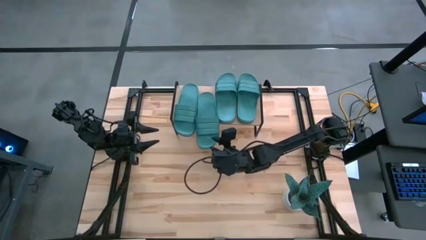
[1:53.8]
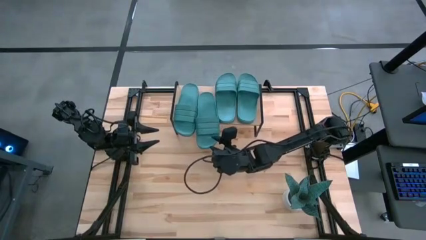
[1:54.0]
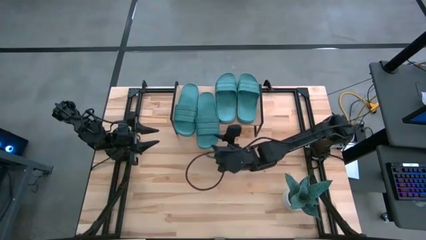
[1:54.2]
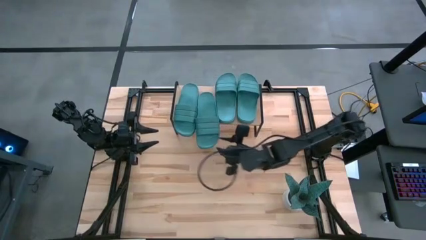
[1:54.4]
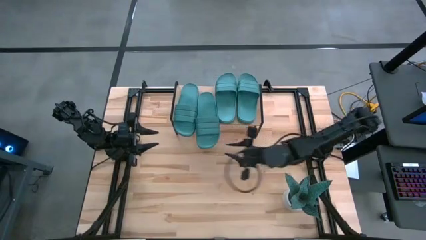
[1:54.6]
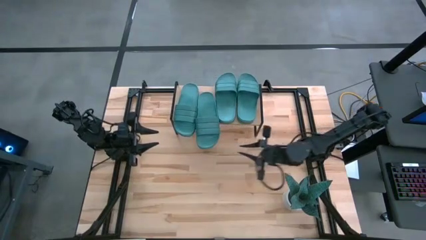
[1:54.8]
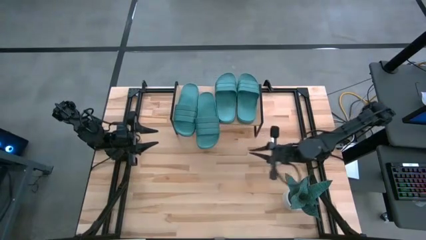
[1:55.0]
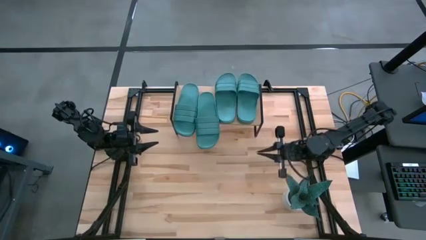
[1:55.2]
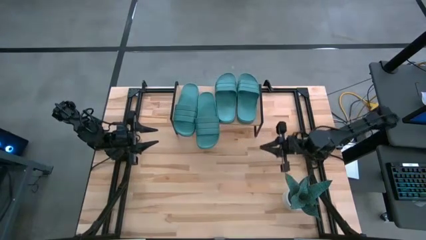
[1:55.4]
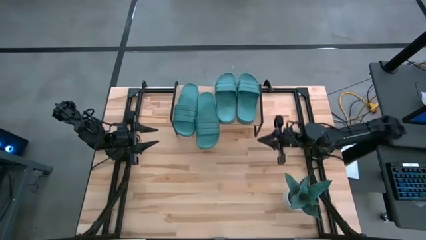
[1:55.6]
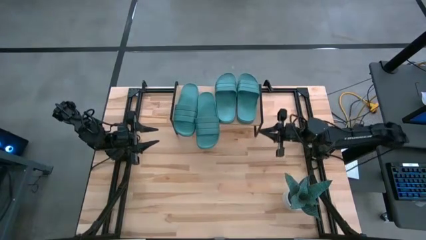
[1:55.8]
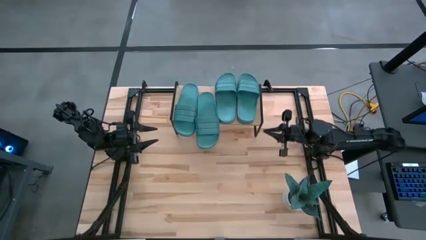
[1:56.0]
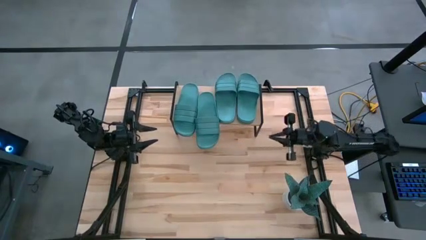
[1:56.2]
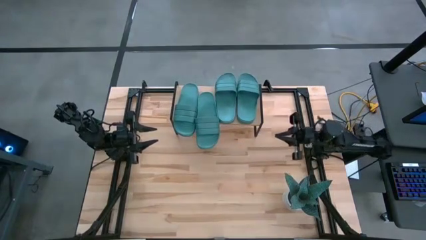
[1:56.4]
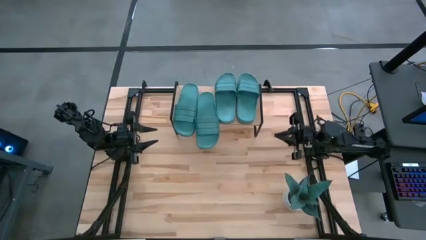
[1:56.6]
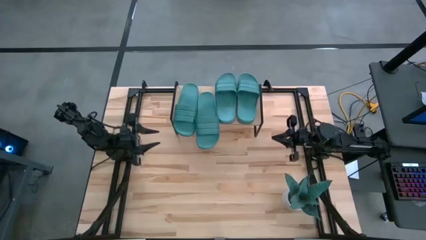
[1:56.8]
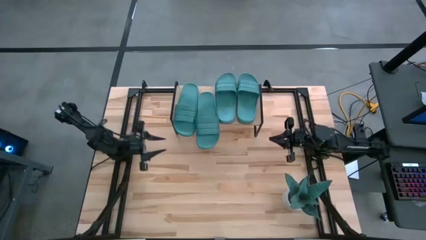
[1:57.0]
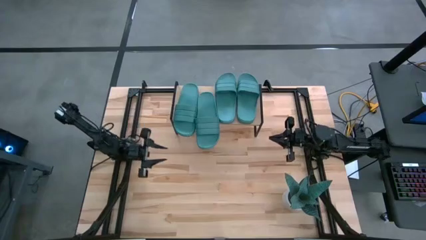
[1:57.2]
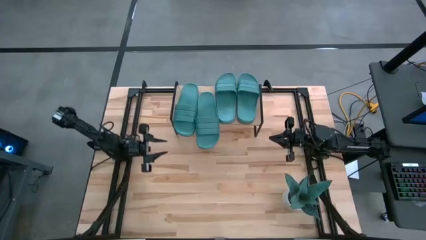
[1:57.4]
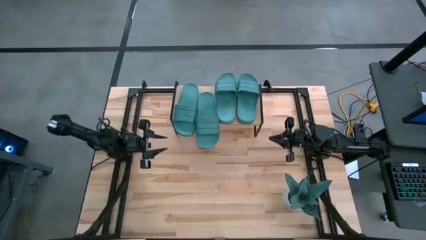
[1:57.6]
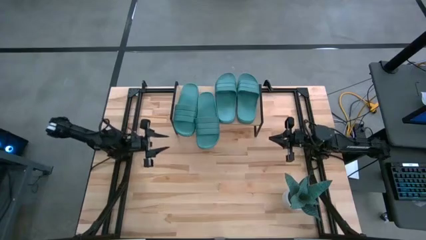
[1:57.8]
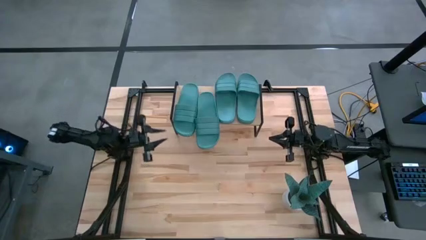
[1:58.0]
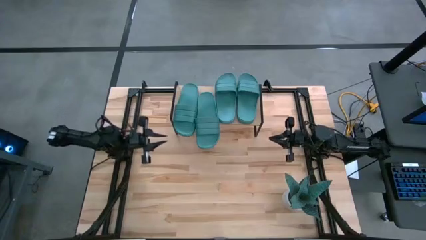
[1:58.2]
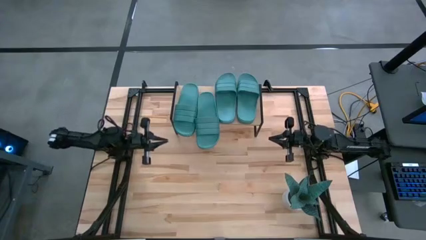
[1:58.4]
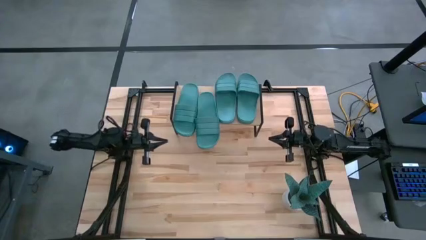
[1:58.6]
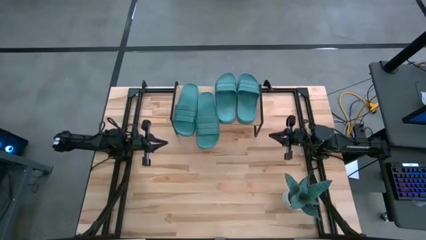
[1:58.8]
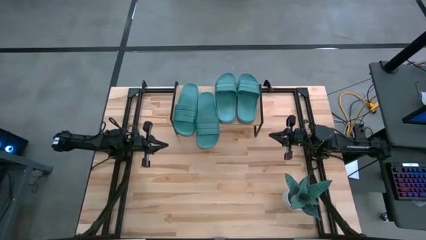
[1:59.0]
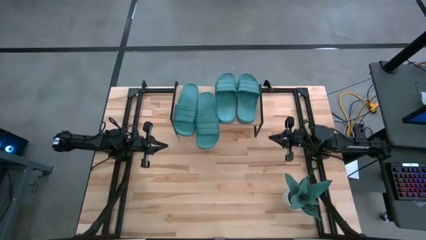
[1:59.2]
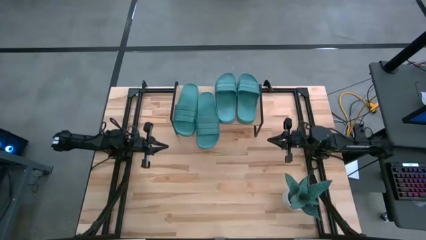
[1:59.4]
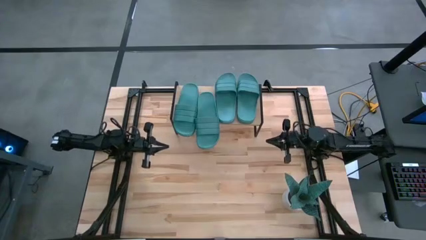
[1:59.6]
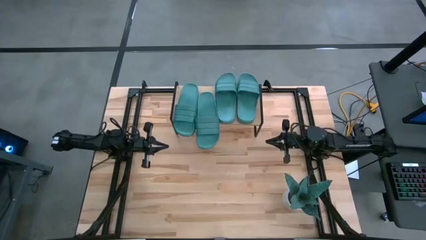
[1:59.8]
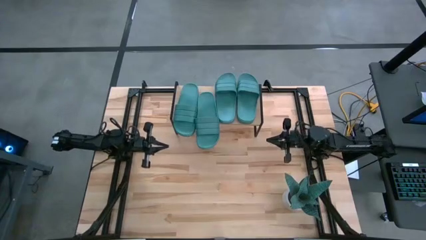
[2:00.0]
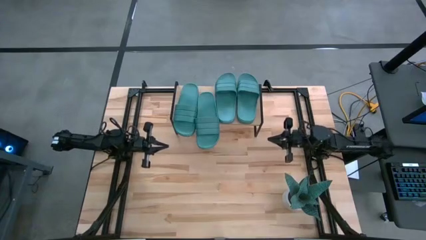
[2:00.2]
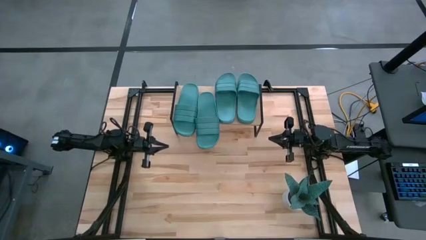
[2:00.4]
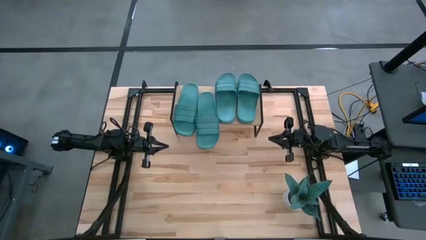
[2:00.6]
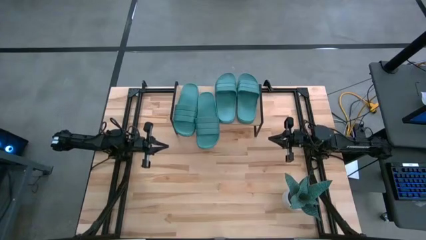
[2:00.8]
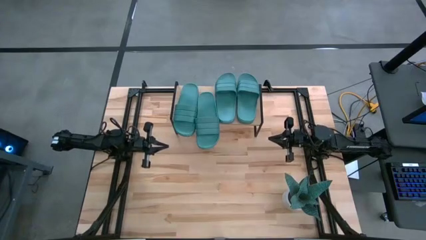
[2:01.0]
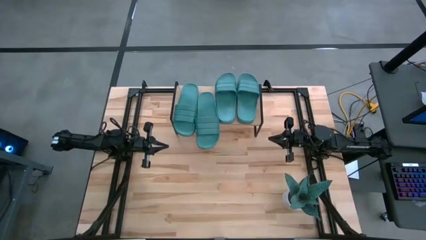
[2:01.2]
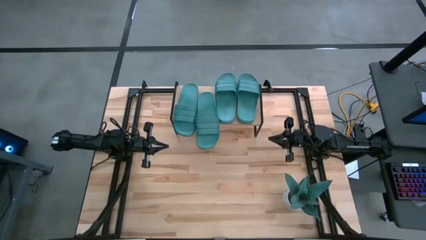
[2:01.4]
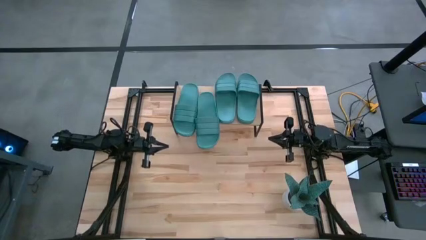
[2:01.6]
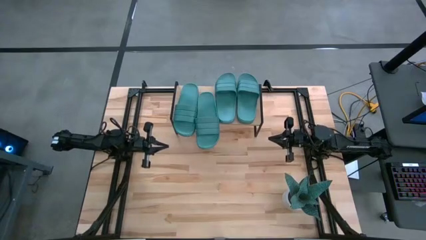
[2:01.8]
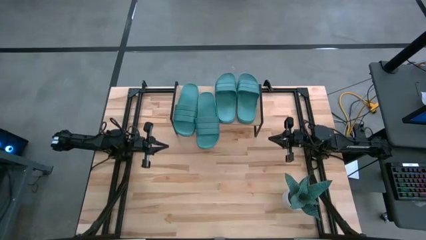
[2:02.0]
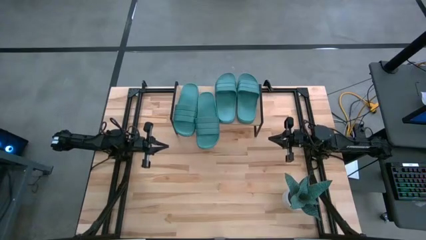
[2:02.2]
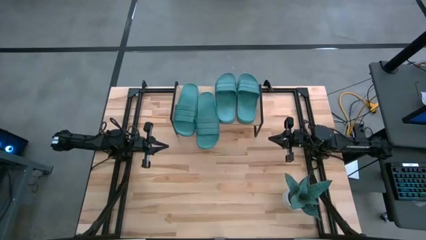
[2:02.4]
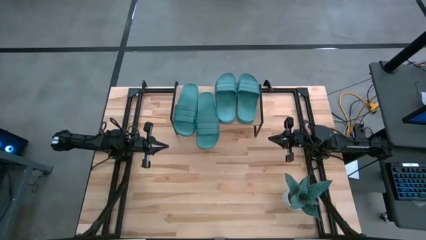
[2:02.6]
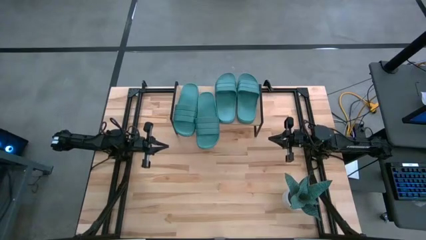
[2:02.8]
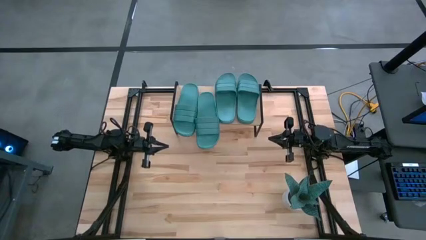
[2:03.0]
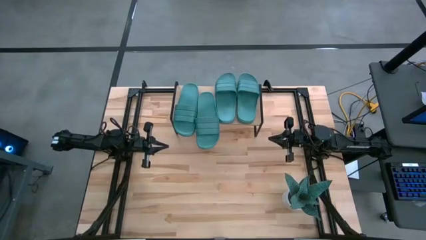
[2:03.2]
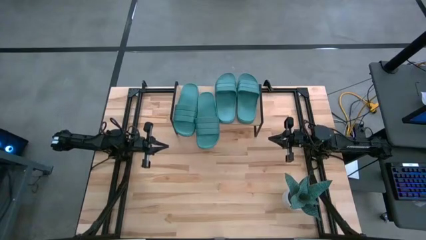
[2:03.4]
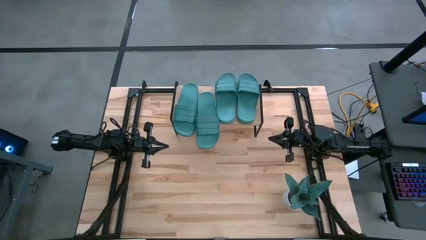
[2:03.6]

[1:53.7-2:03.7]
Task: Pick and place slides into the shelf
Return to Home Position

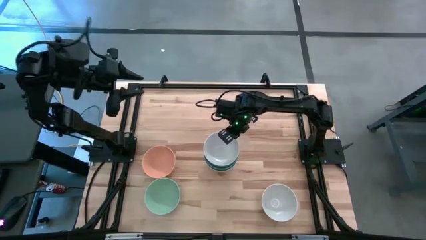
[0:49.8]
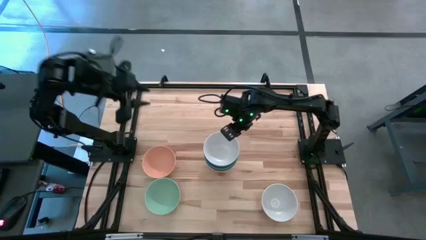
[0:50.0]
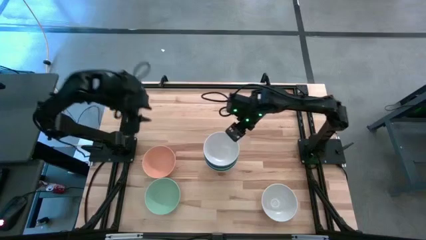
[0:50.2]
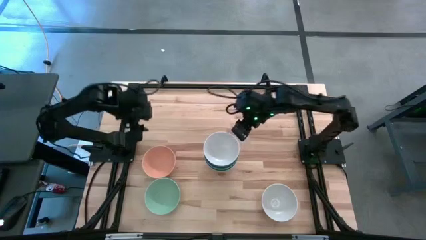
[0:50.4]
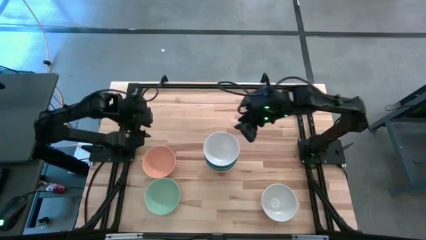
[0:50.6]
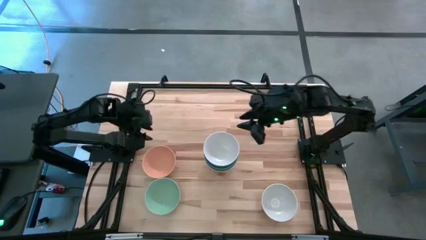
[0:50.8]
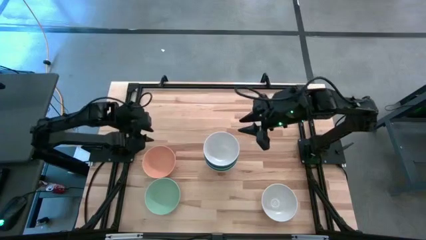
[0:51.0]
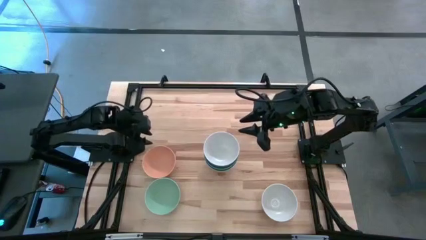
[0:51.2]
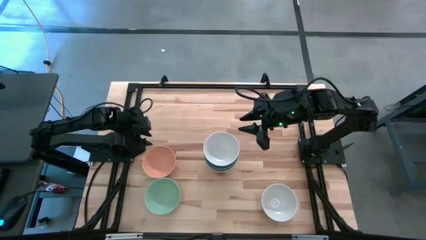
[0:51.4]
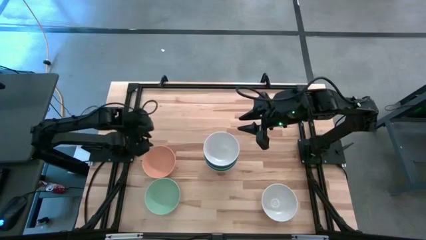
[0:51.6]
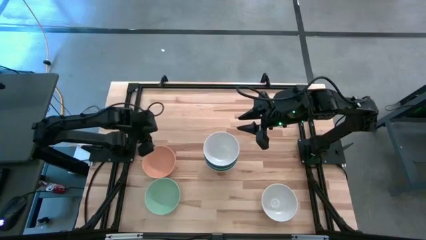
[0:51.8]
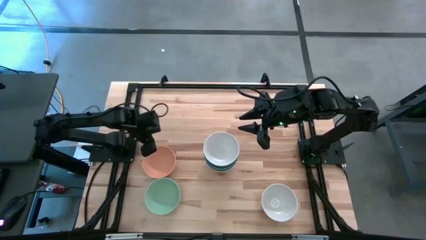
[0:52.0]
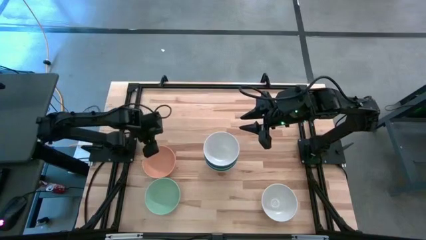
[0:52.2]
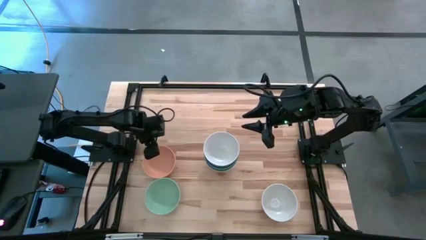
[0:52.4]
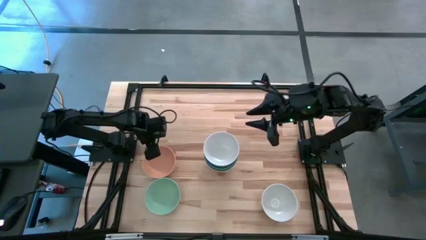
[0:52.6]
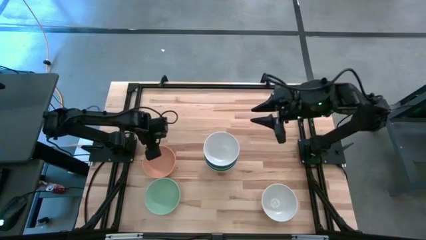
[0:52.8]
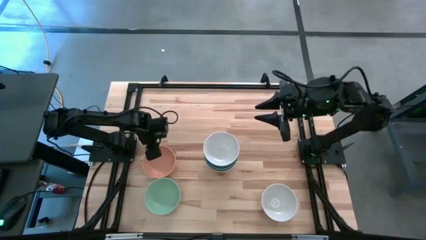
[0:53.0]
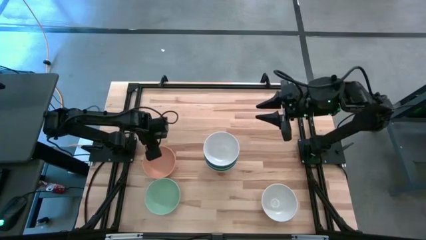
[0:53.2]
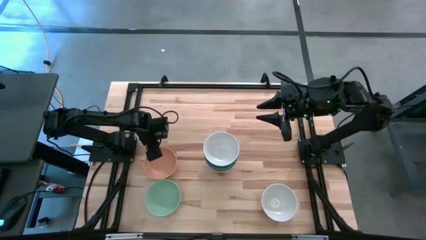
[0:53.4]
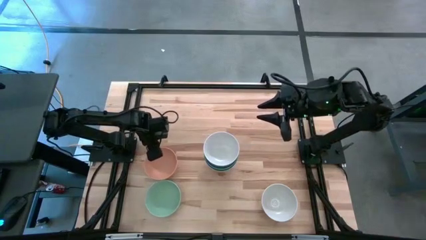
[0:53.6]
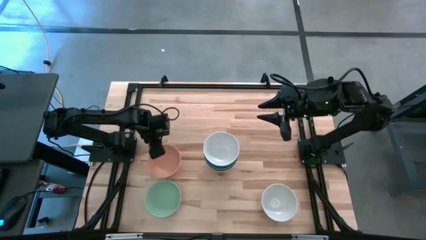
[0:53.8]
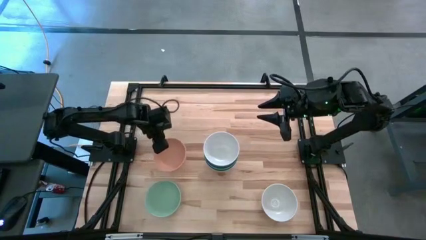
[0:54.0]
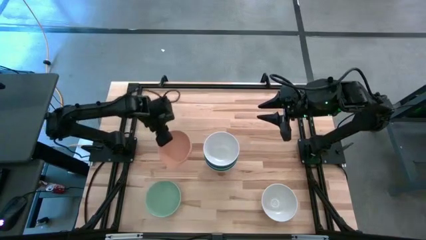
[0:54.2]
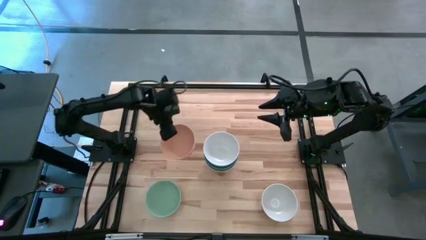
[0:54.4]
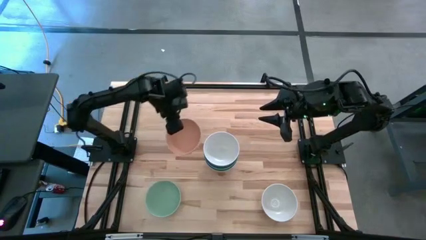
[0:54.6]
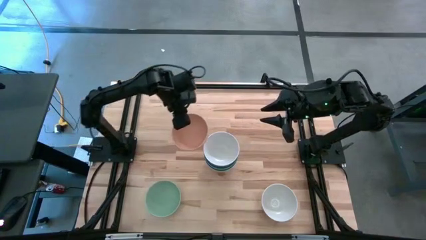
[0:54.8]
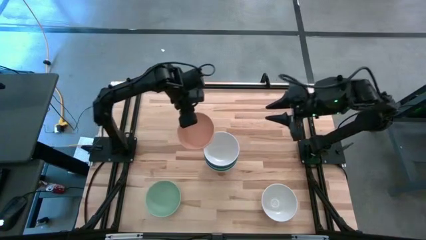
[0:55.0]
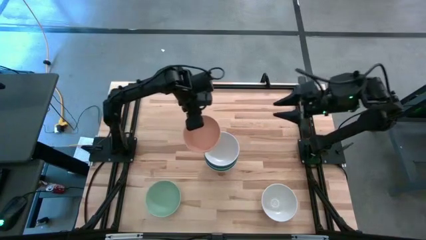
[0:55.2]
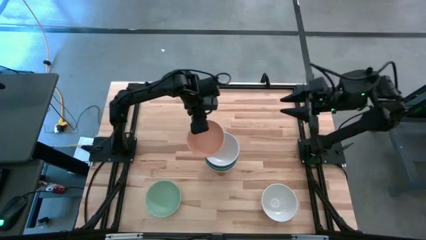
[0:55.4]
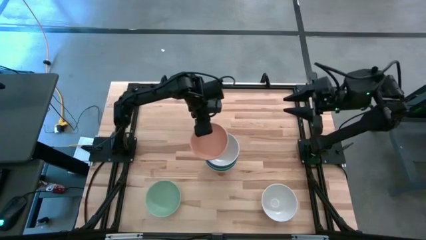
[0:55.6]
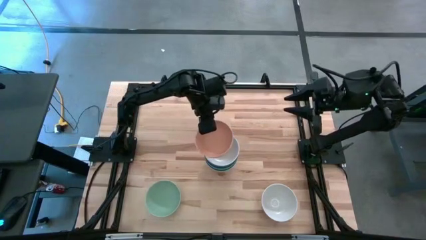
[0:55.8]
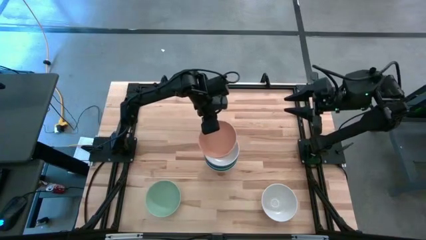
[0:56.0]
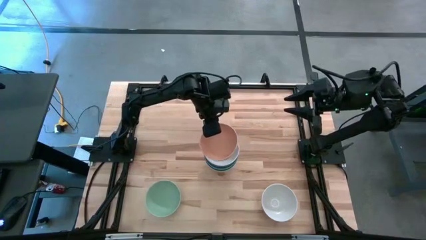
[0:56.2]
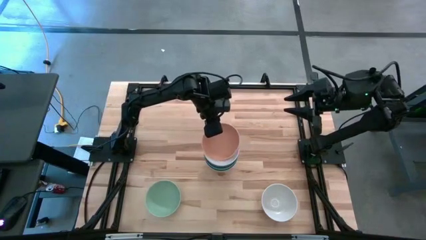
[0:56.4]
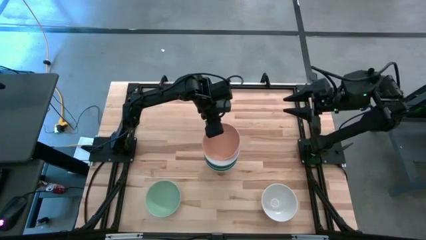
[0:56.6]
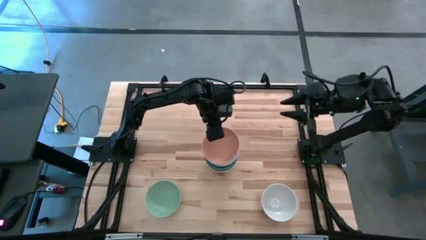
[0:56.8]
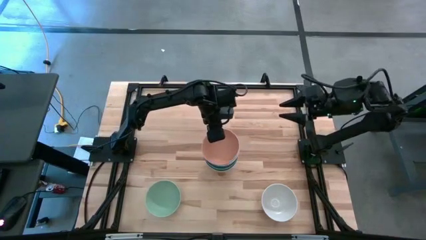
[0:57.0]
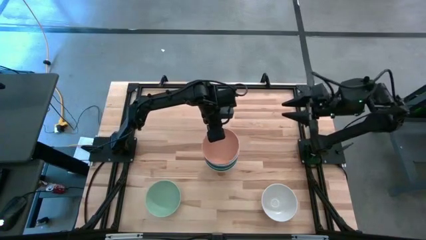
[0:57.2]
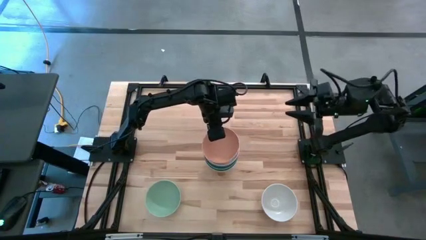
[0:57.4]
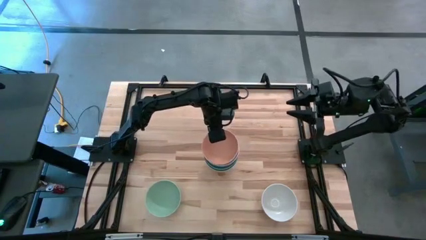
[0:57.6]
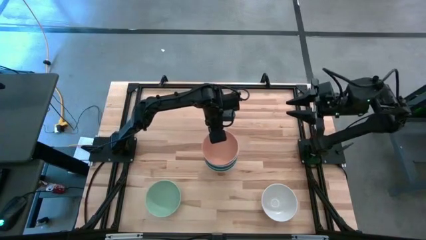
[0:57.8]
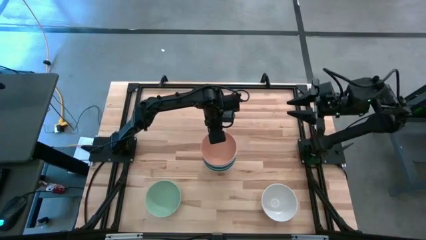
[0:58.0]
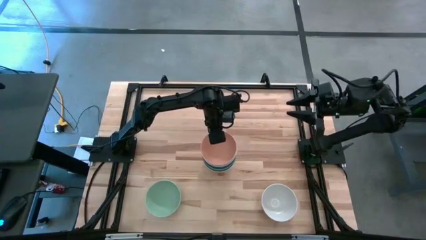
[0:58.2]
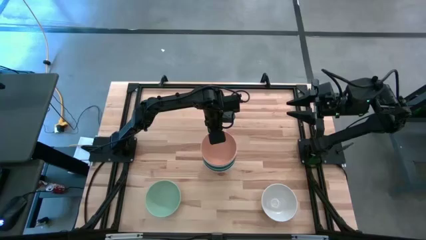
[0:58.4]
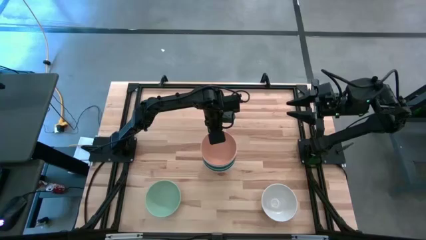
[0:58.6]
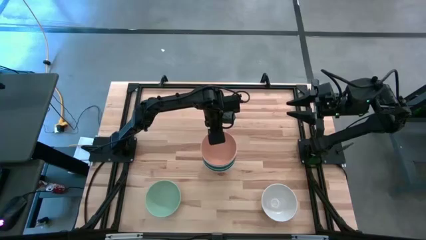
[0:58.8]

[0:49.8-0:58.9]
Task: Nest bowls inside each other
Stack the brown bowl on top of the white bowl
